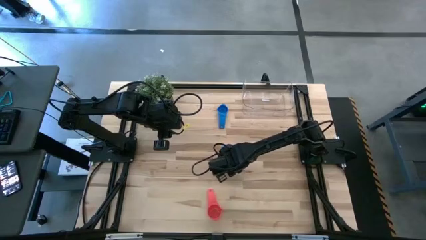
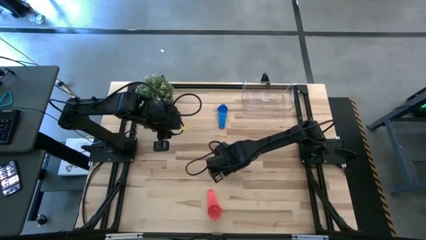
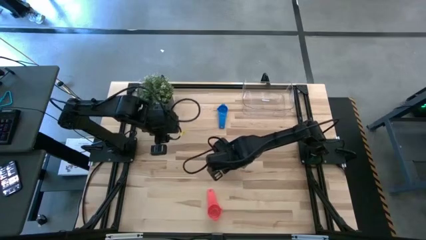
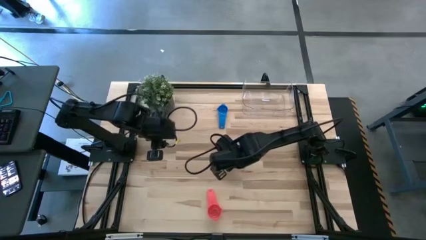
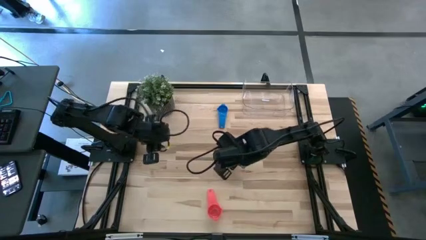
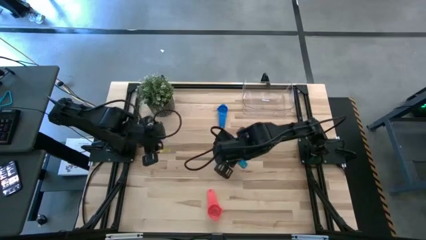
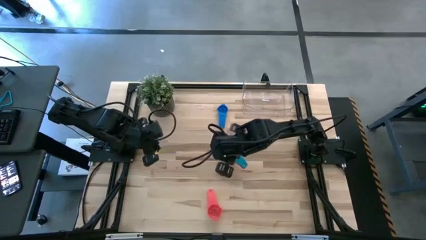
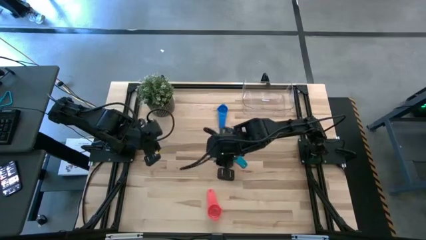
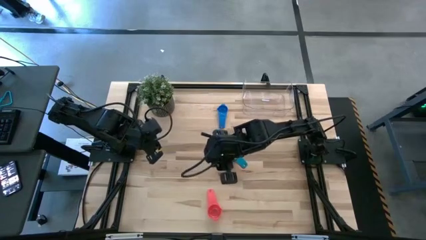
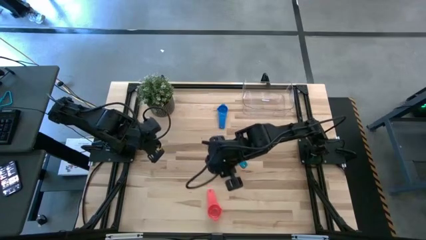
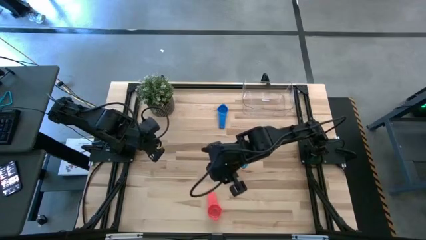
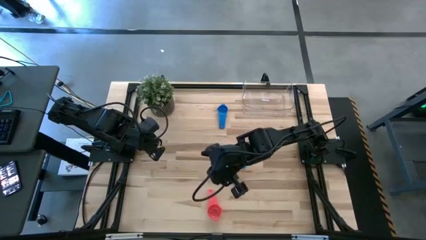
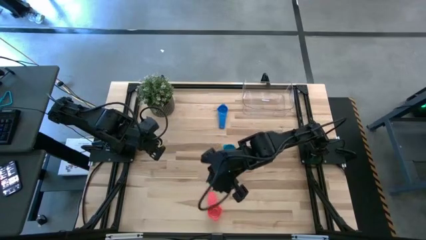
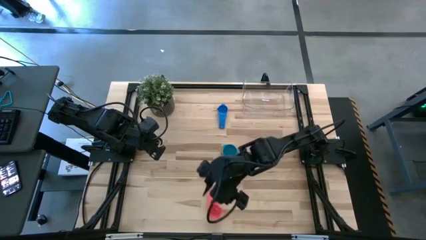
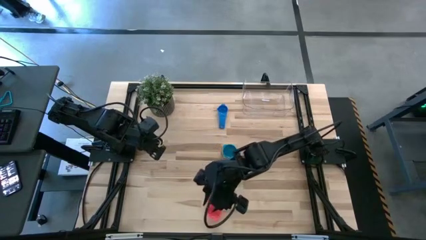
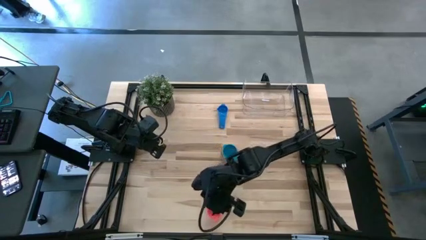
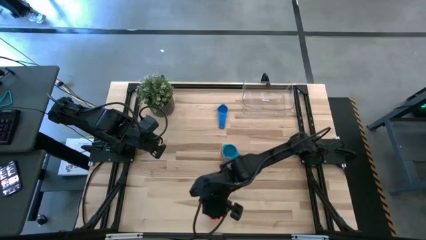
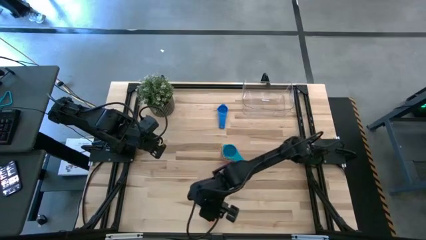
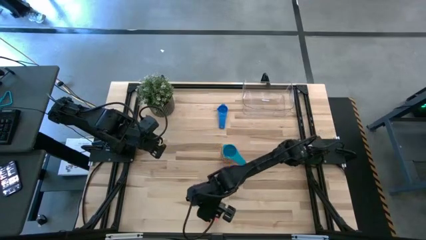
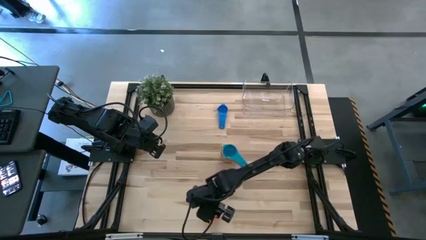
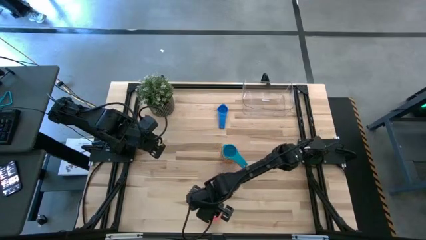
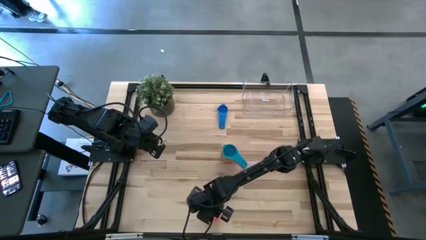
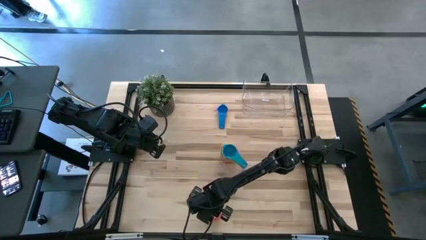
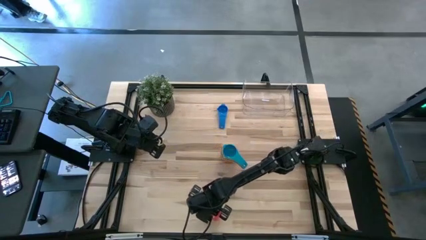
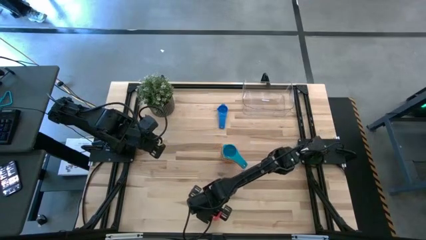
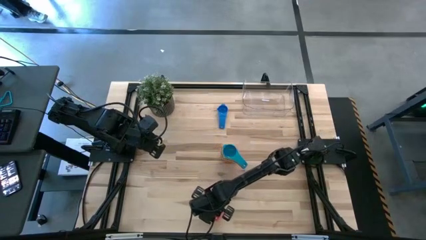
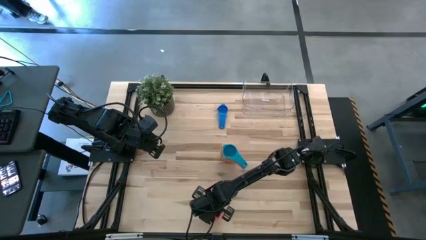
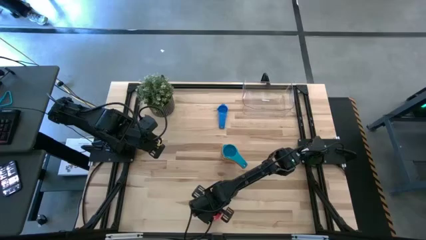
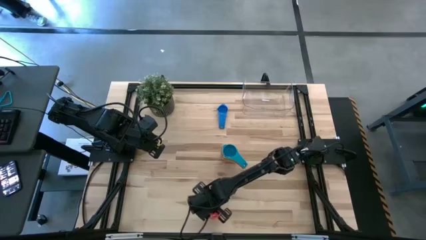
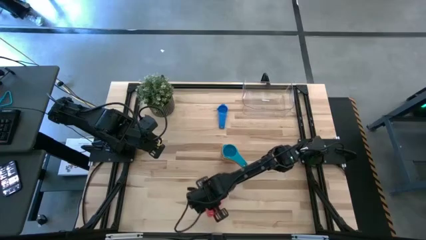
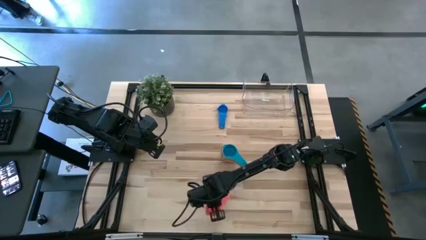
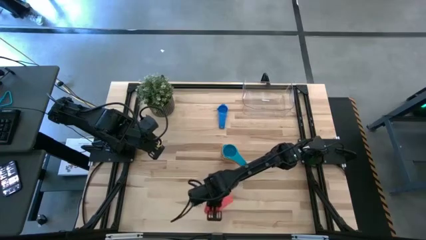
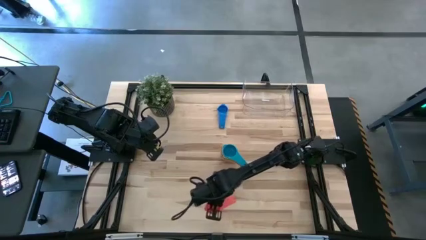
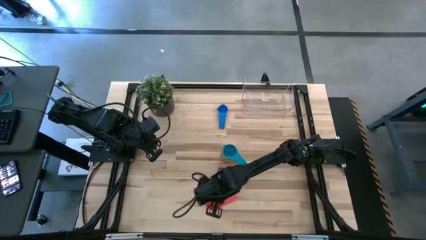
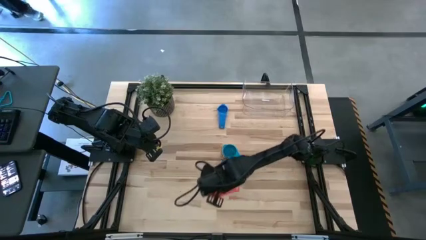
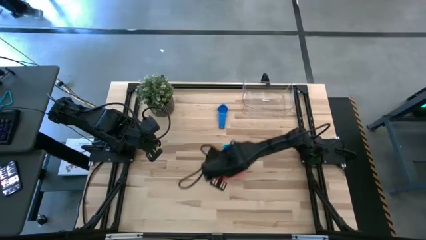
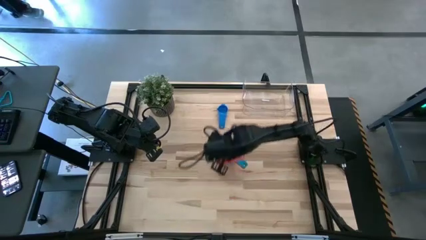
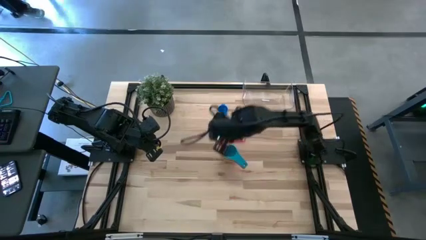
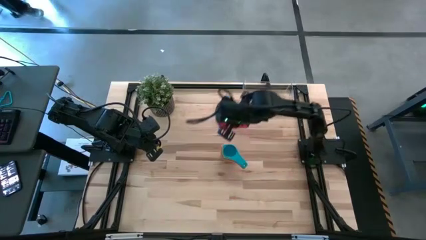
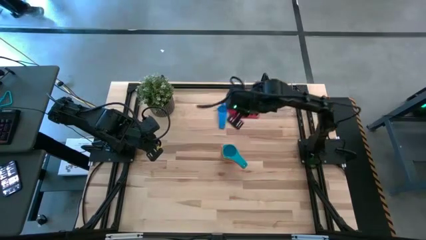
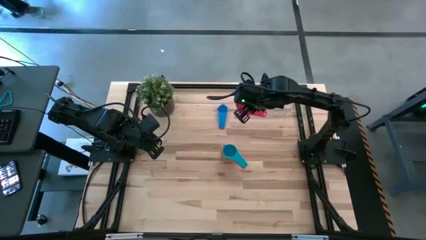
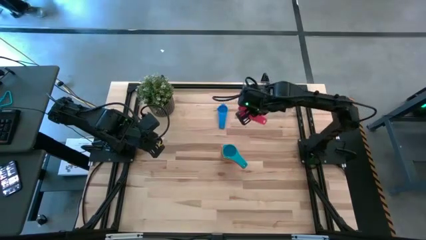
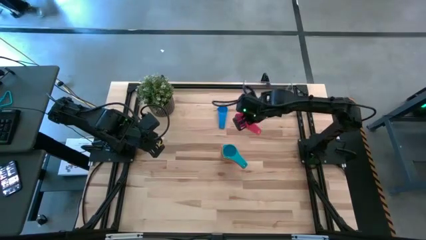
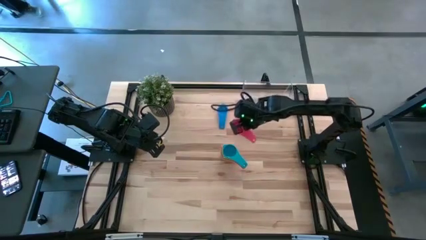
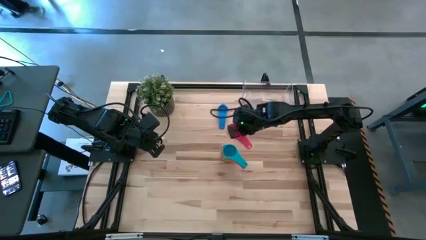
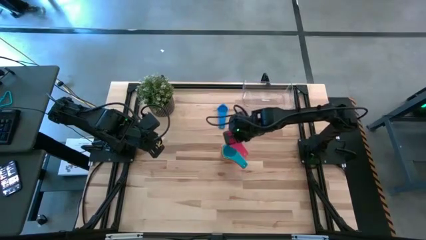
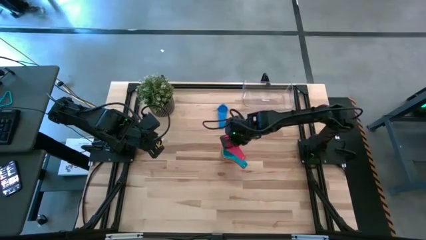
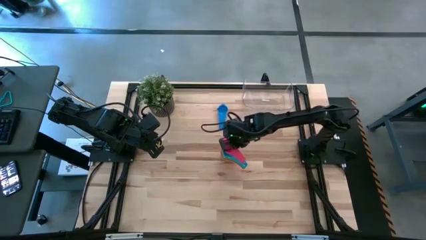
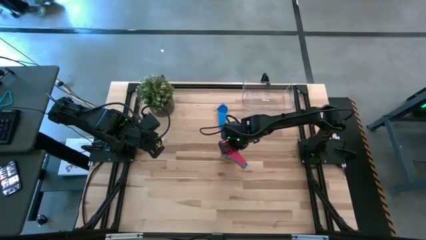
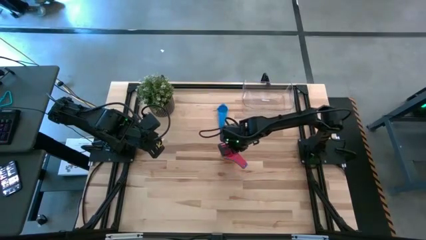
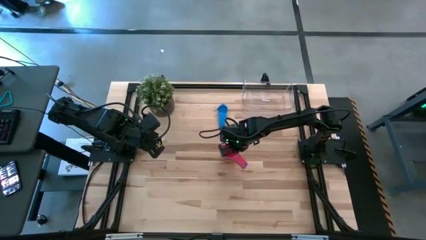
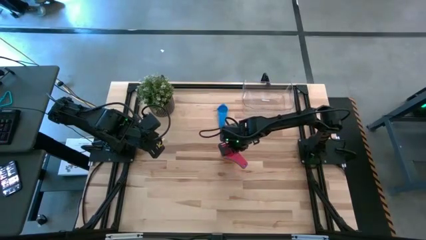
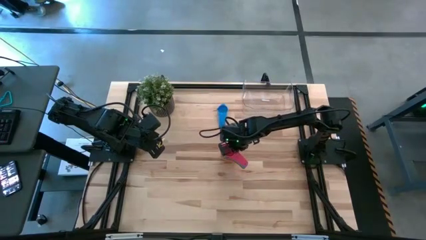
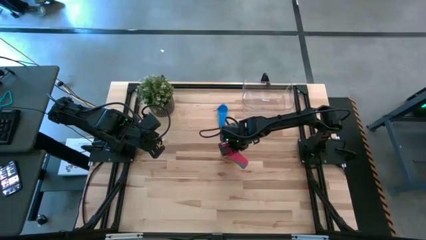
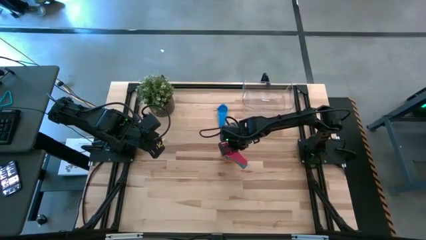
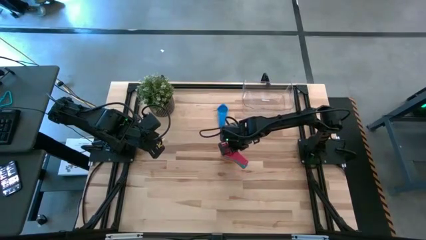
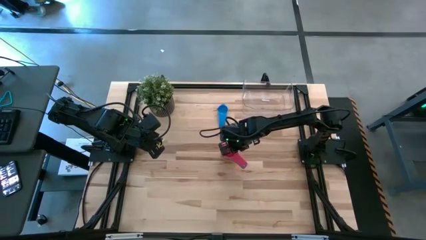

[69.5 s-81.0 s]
Task: Nest measuring cups in basket
Stack the red measuring cup on top of the light blue measuring cup

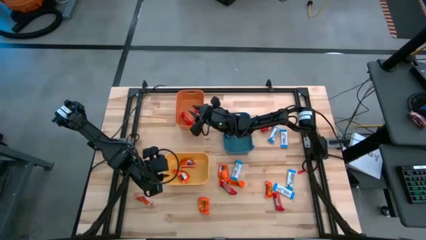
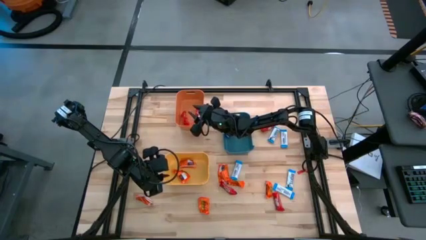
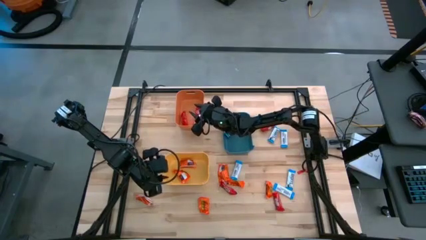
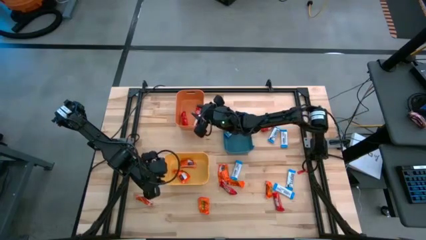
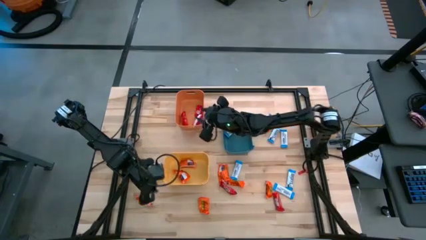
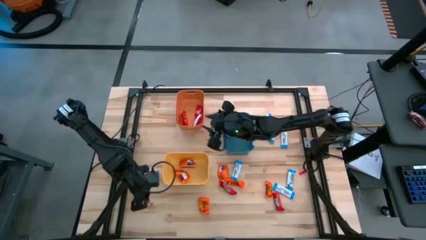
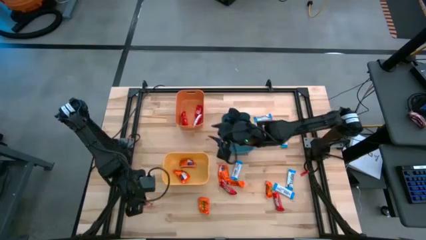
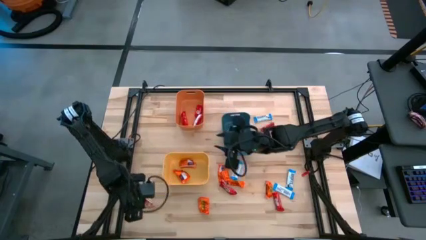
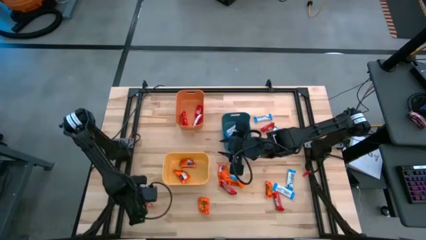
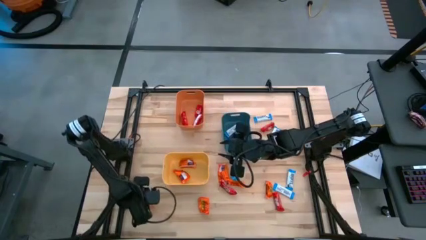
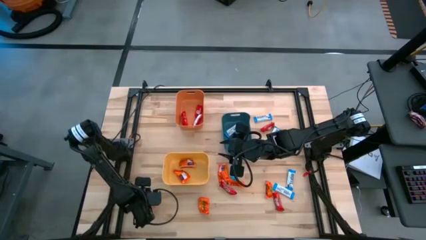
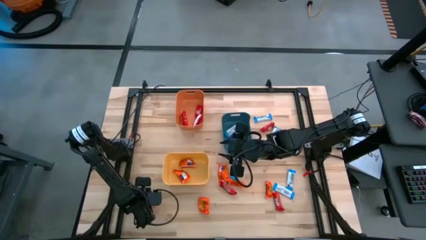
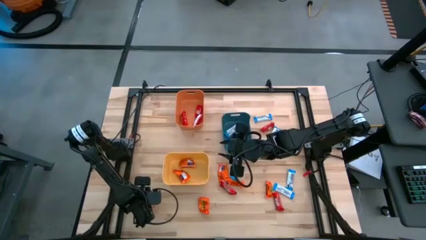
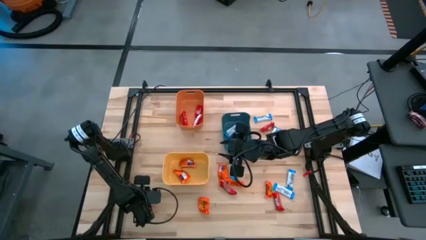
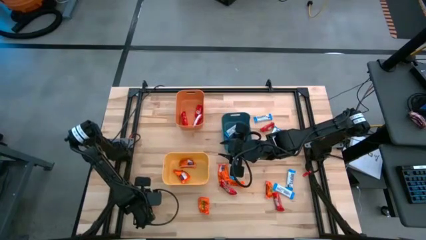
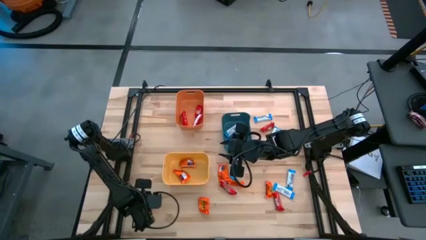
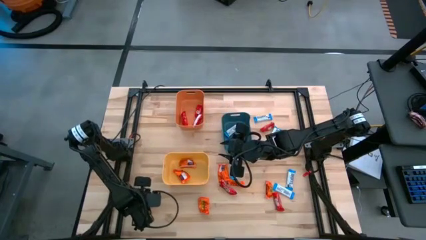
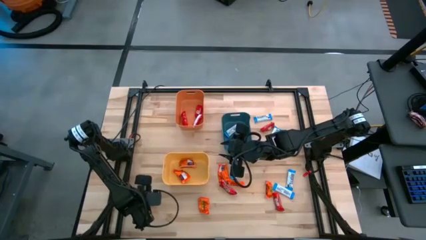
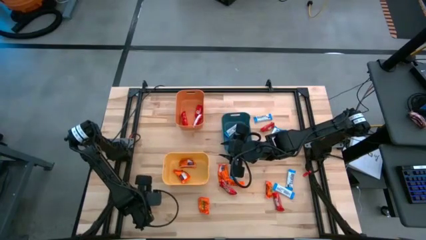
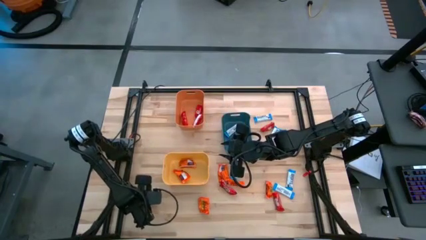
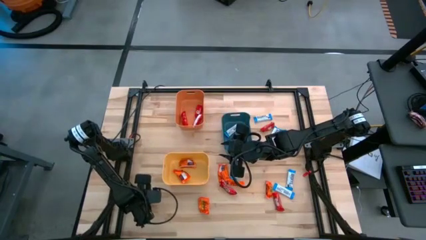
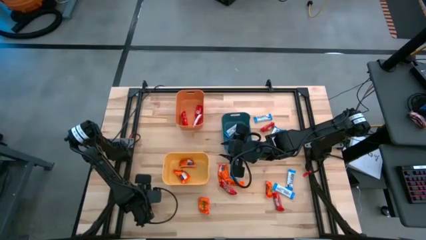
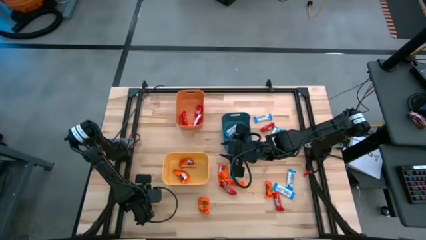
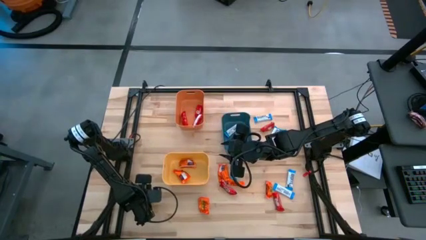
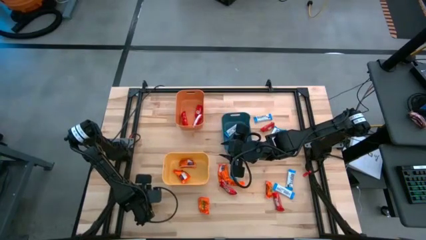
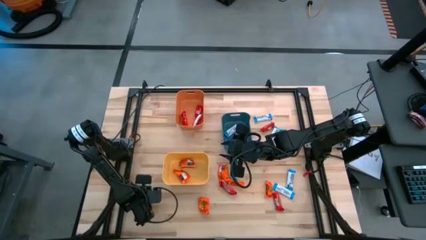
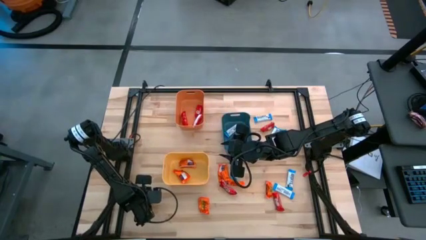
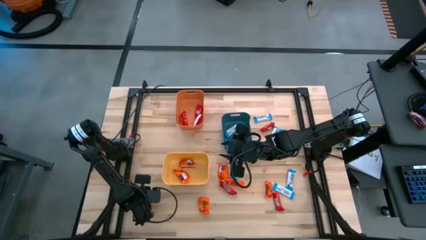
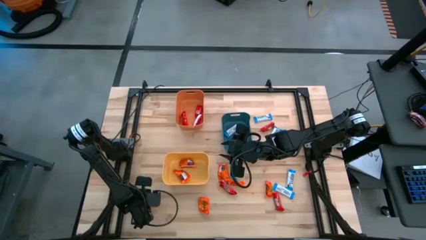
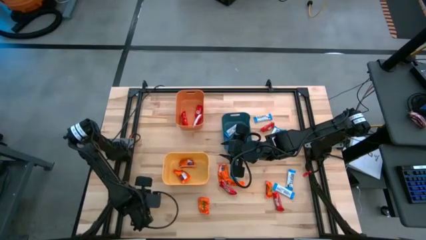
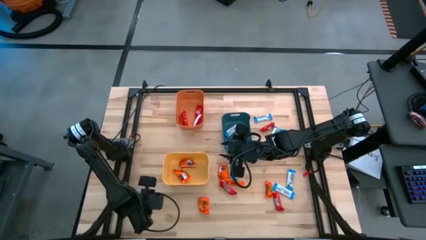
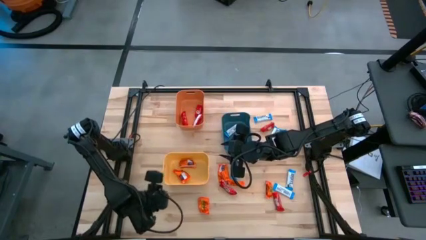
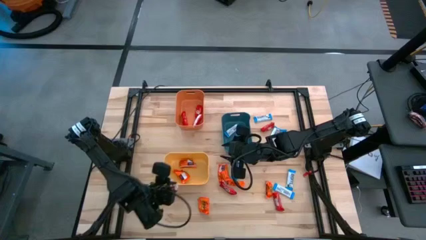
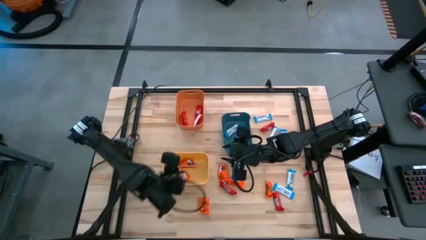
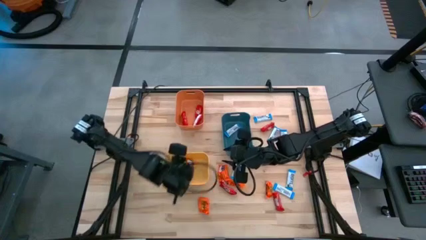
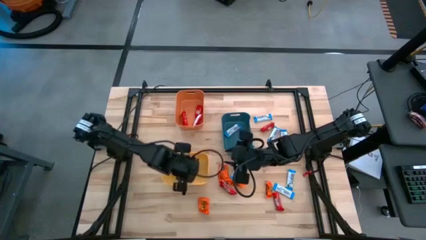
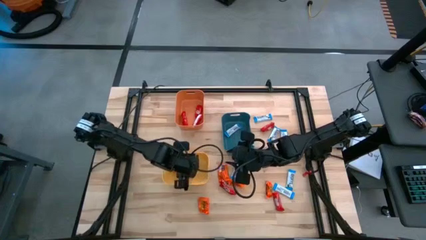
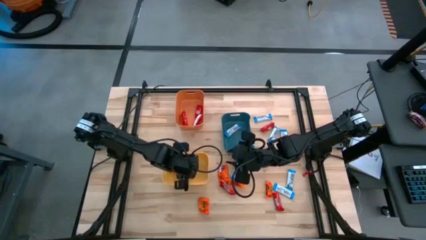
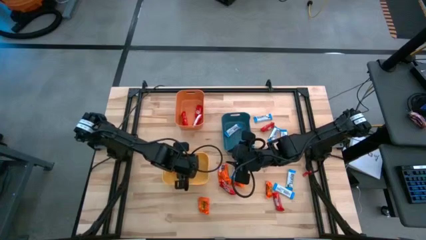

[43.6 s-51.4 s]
Task: Organize candy in baskets
Put the orange chocolate into the yellow bin
